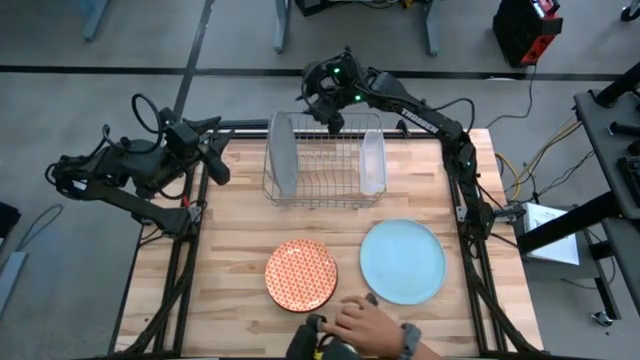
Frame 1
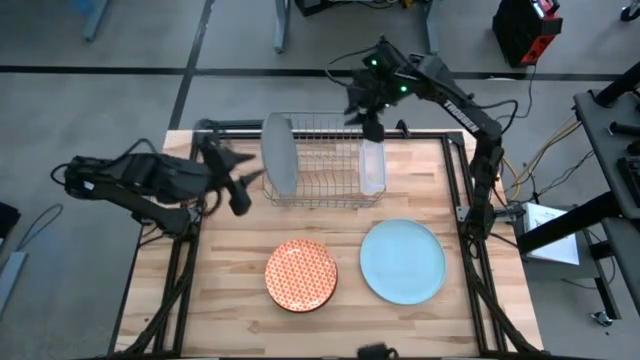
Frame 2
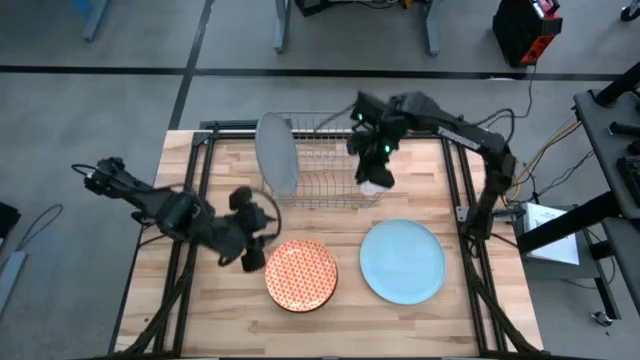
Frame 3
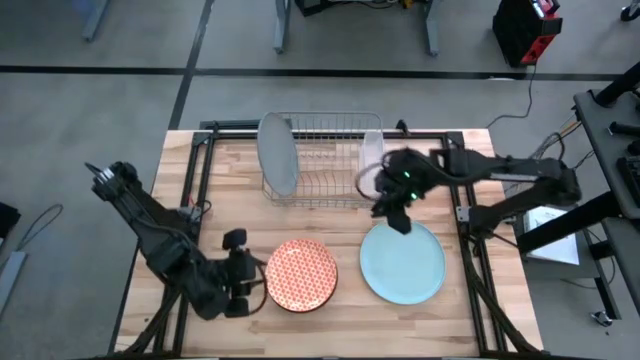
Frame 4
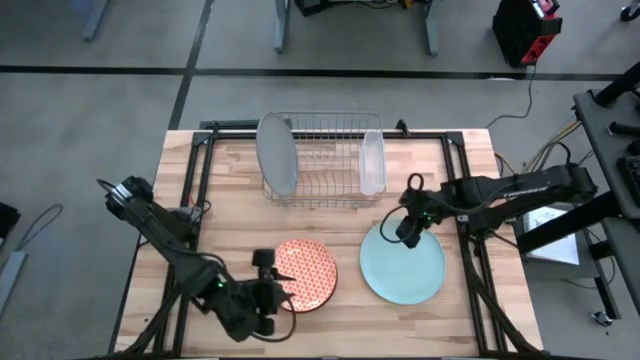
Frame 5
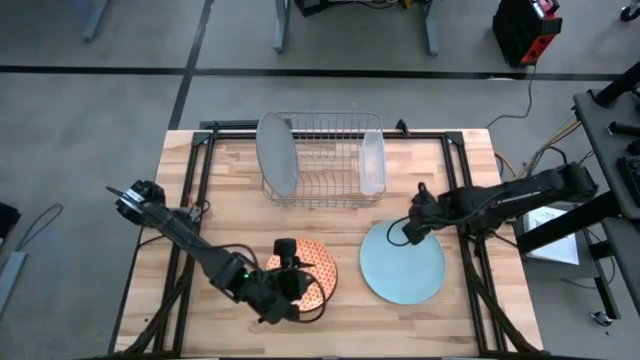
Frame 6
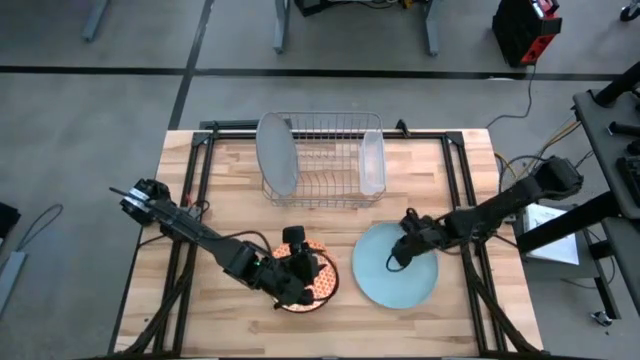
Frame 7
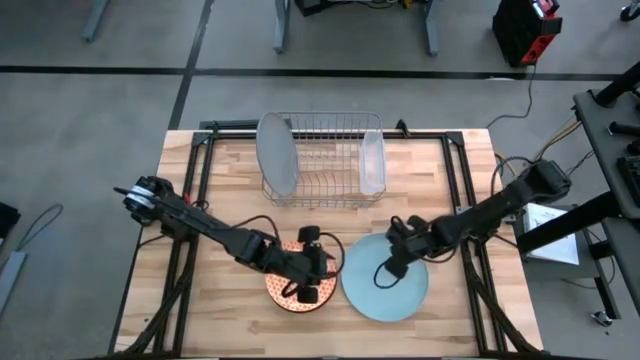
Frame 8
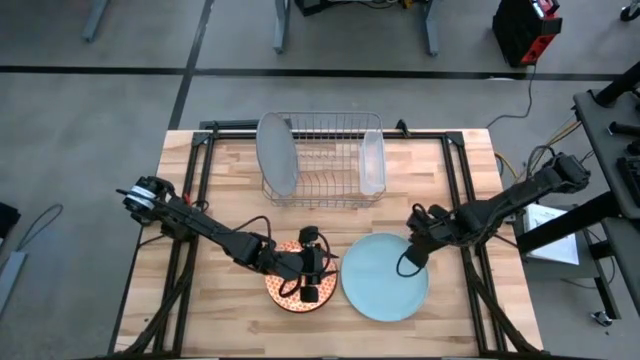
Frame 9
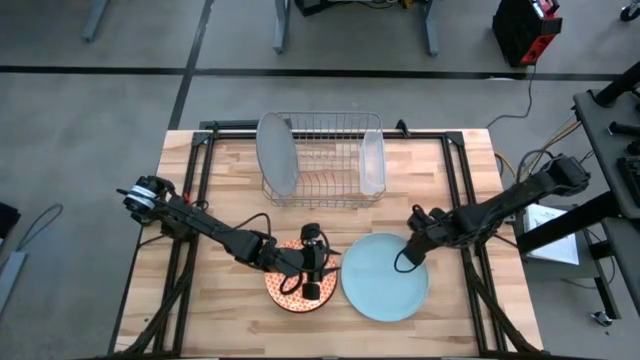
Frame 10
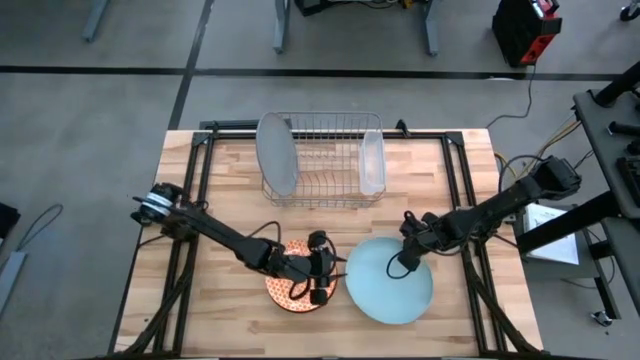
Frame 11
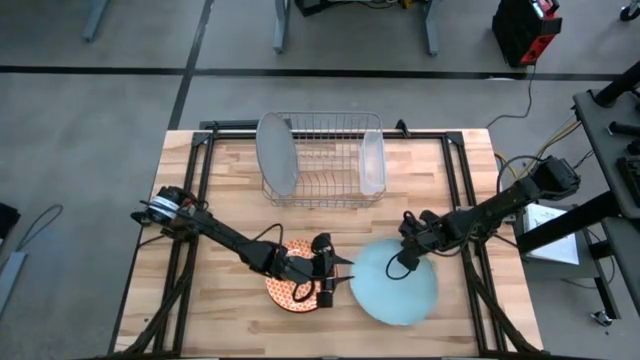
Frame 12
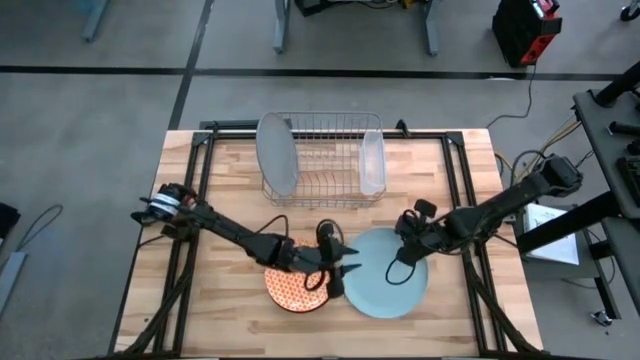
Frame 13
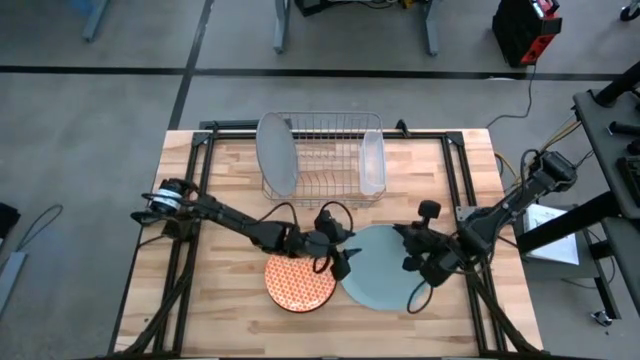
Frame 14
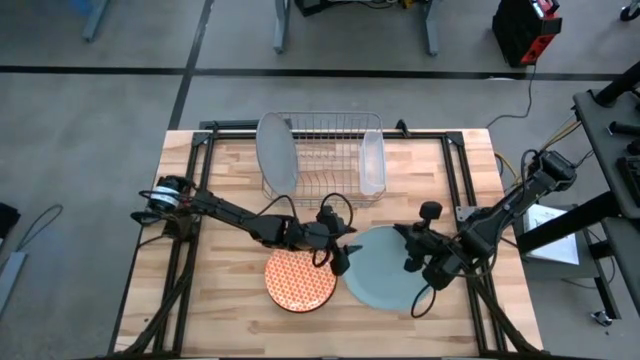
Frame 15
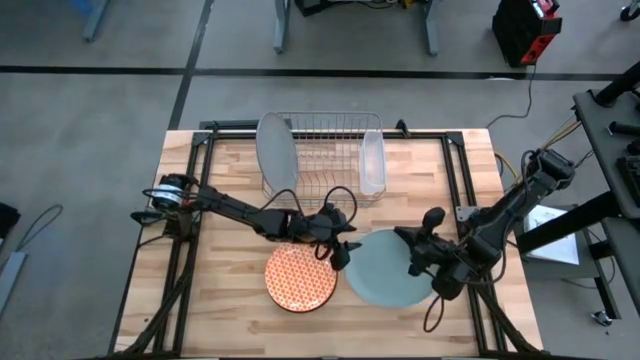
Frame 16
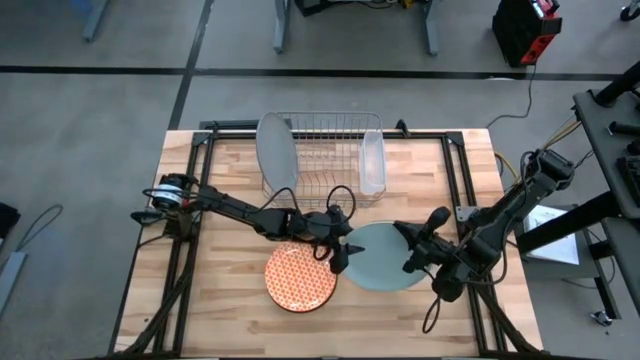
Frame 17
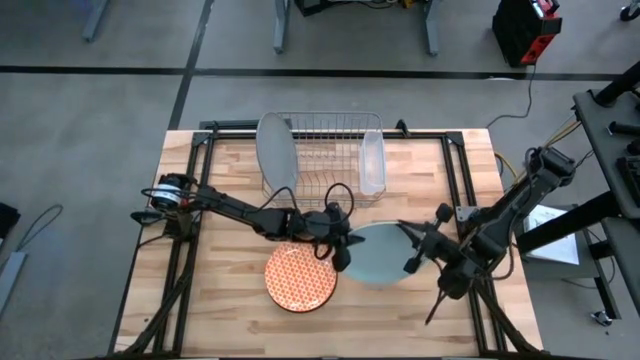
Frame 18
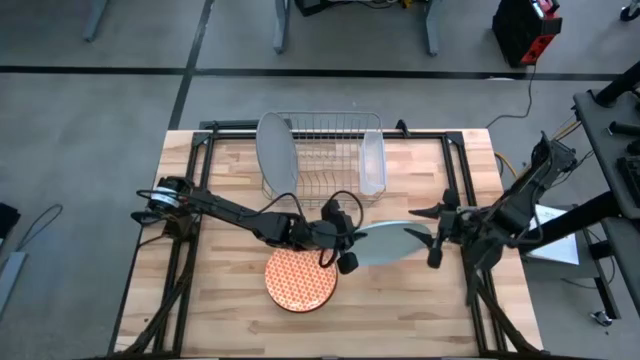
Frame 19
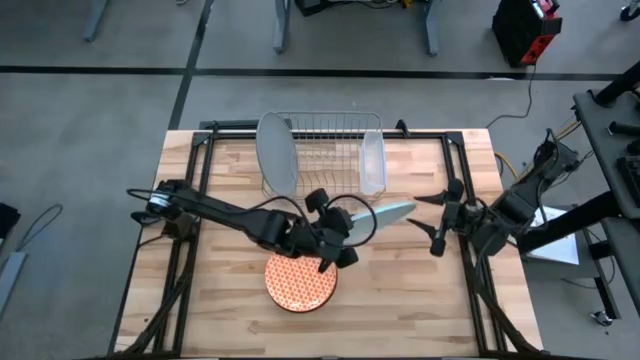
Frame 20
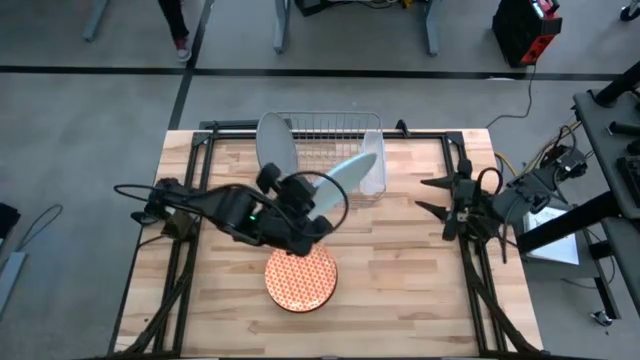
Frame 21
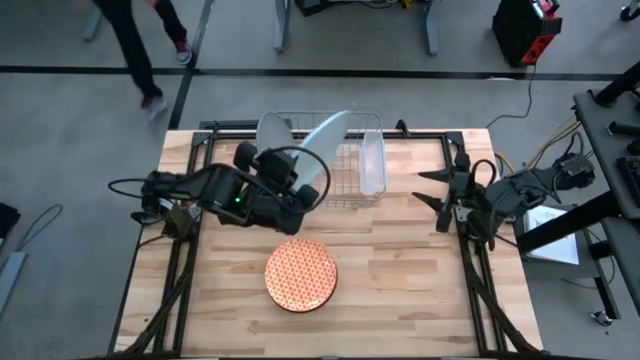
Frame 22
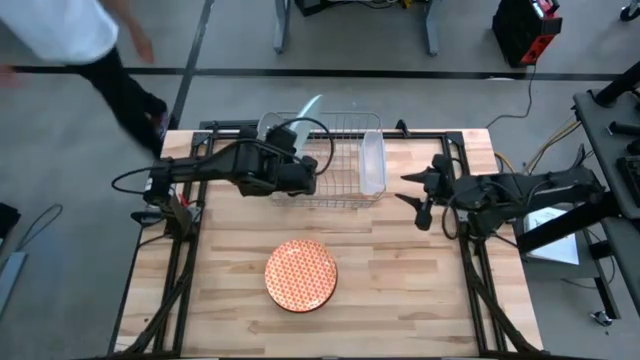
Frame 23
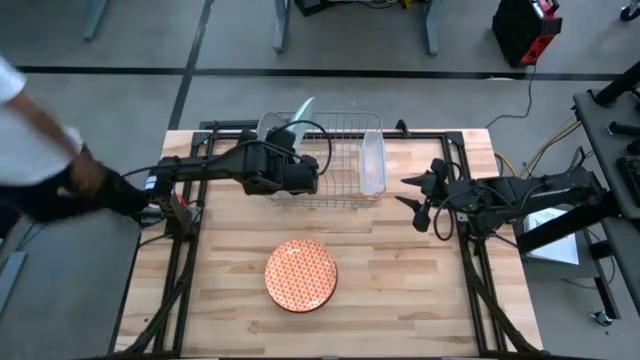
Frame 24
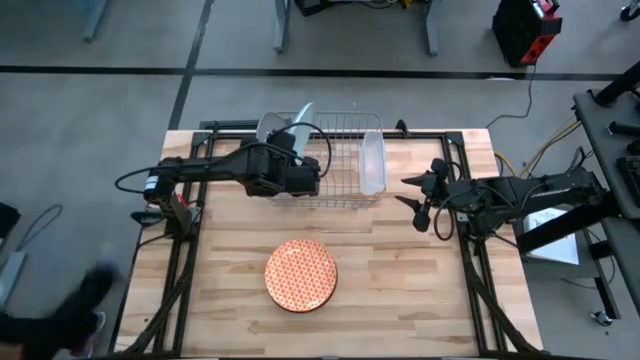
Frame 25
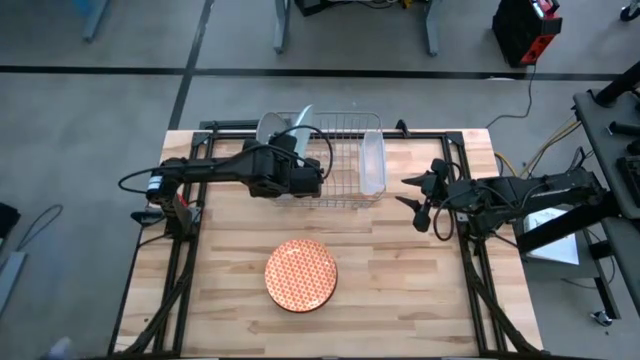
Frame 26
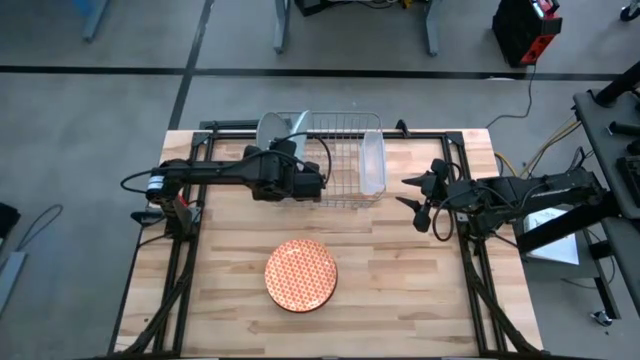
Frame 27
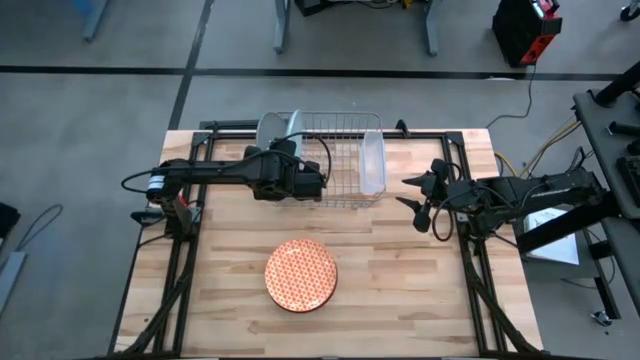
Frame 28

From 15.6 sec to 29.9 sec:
Task: Sort dishes
Put the light blue plate in the dish rack

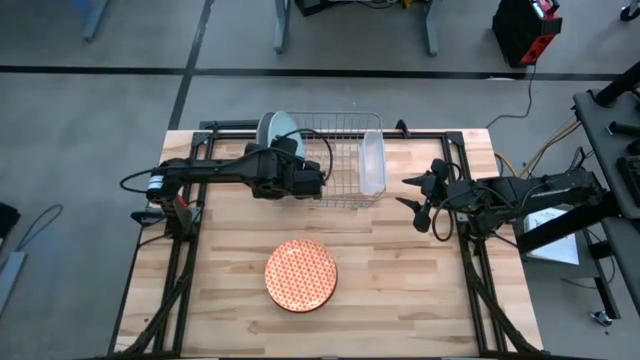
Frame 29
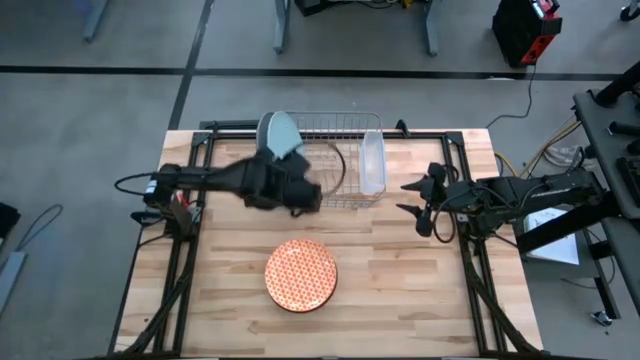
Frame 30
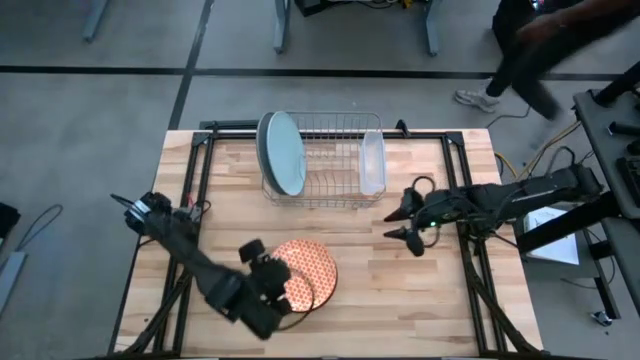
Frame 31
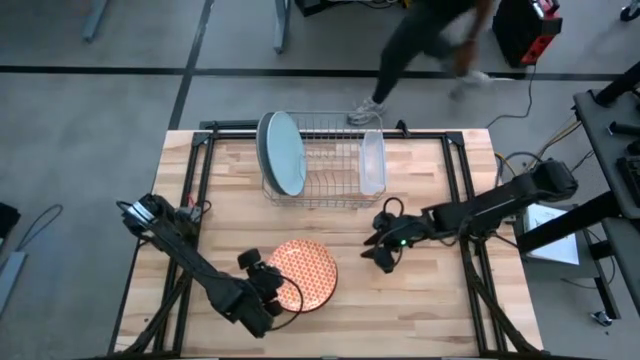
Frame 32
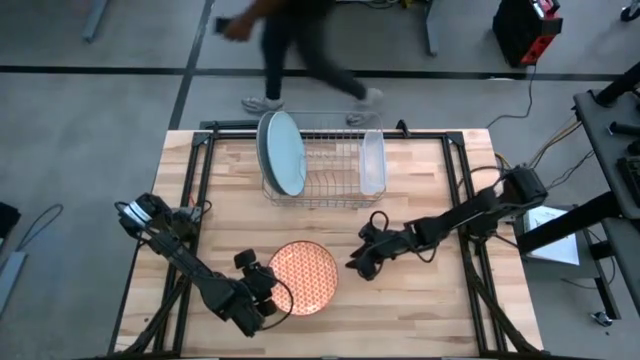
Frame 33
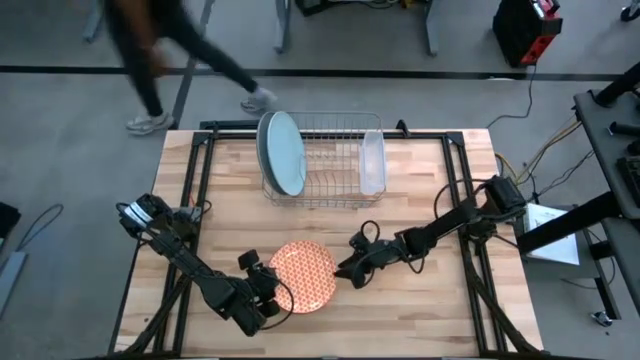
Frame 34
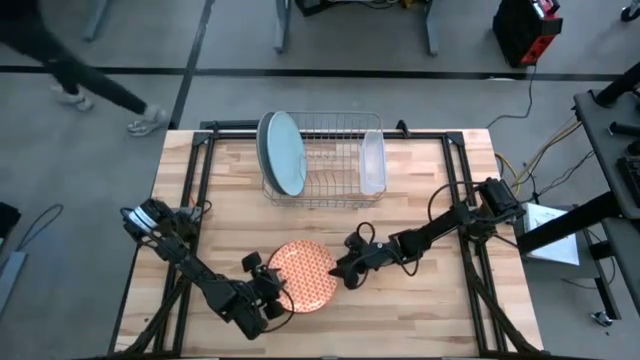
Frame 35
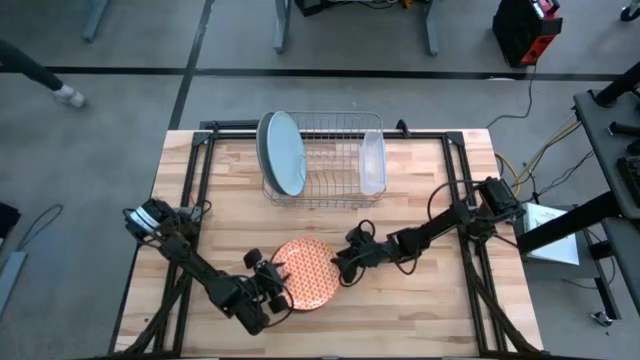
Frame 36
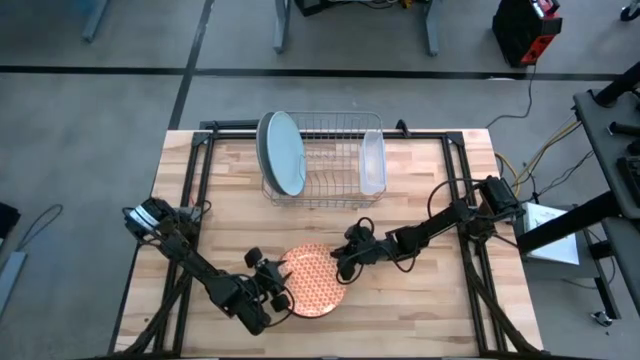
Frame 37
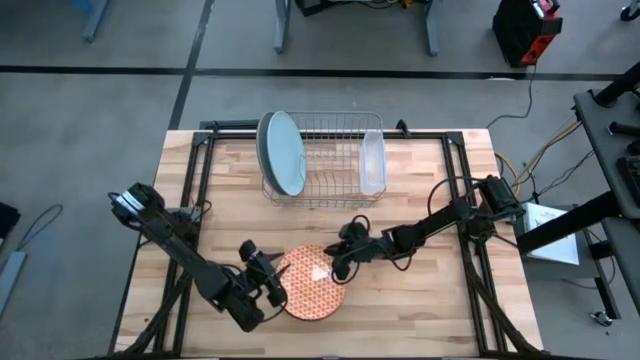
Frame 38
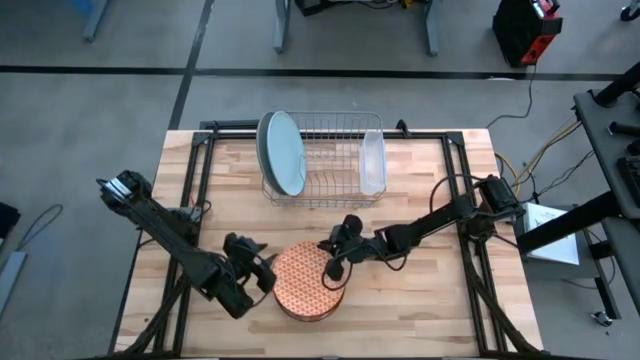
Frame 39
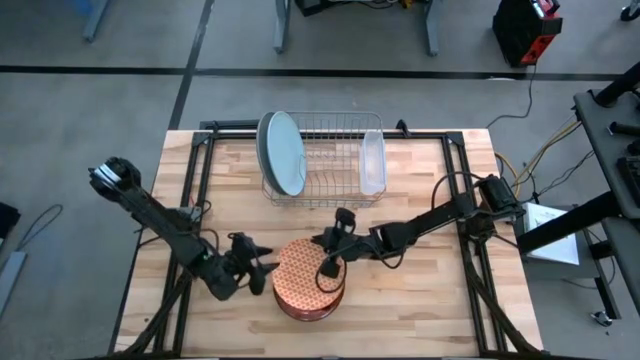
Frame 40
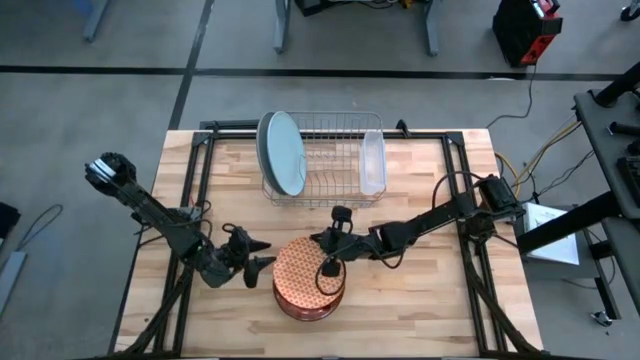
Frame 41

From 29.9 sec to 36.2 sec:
Put the orange plate in the dish rack
